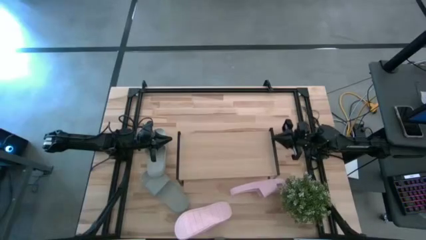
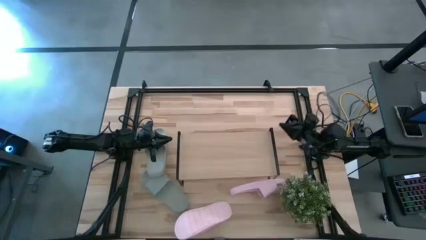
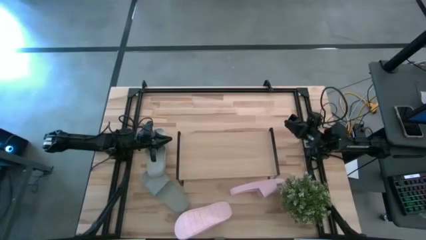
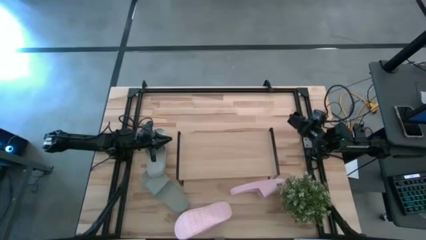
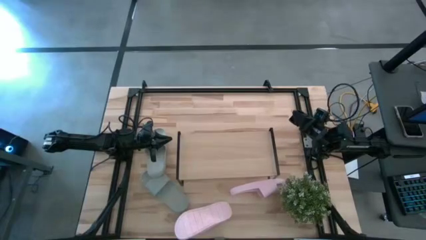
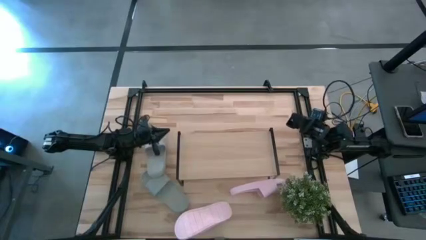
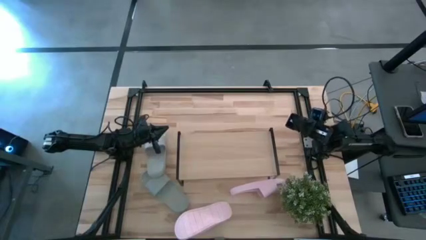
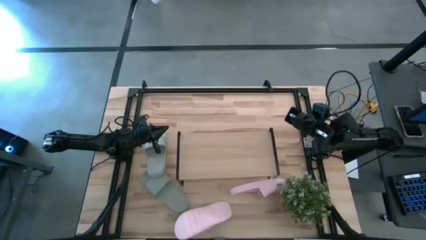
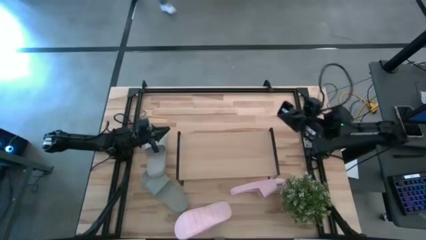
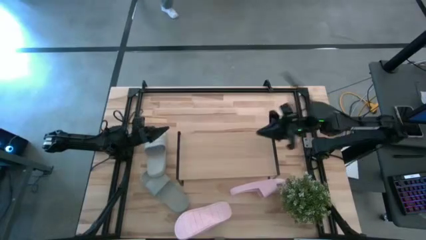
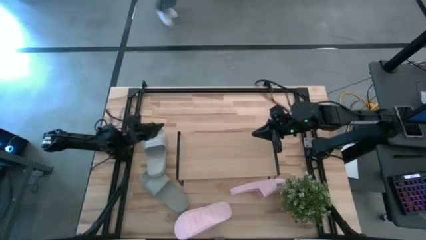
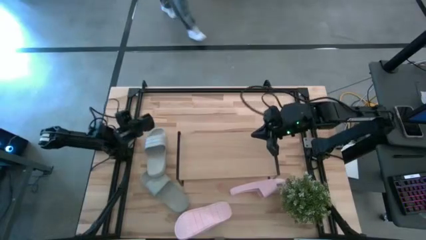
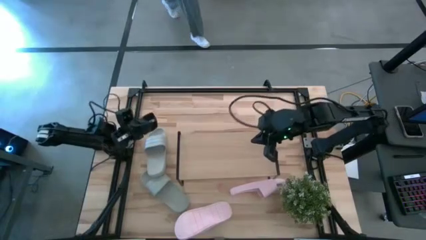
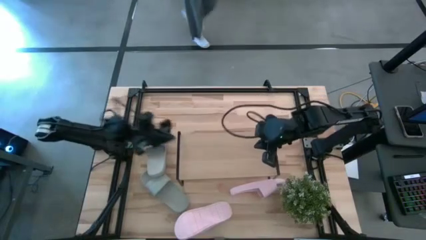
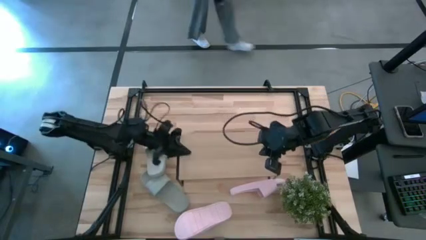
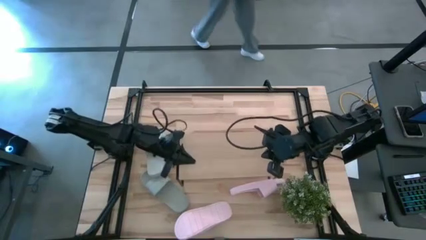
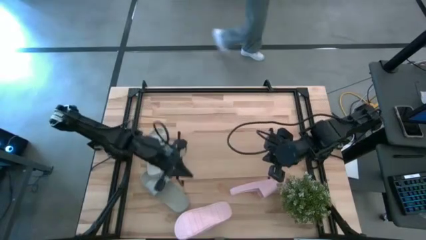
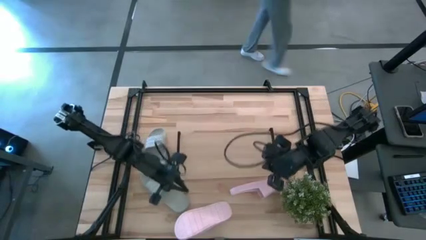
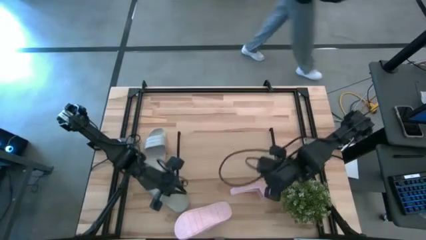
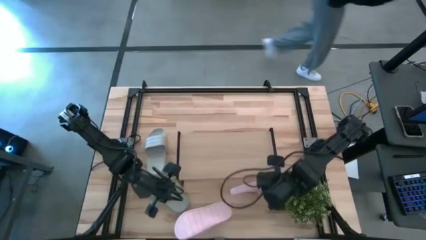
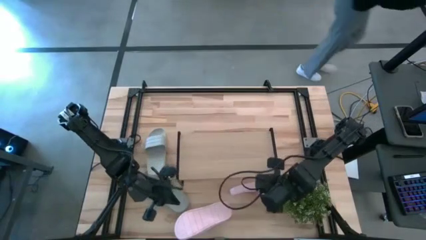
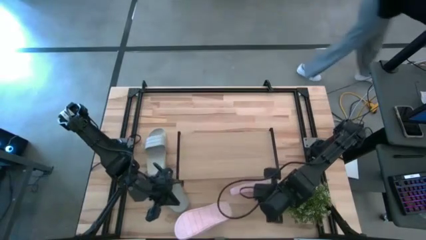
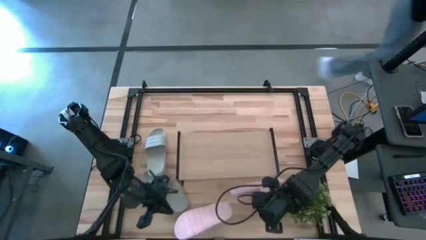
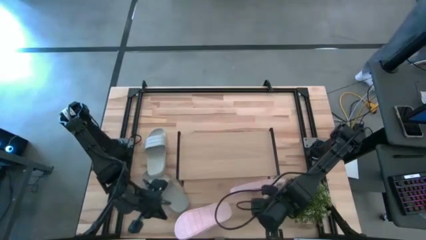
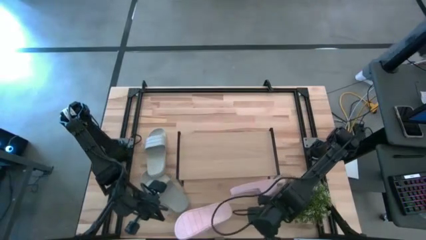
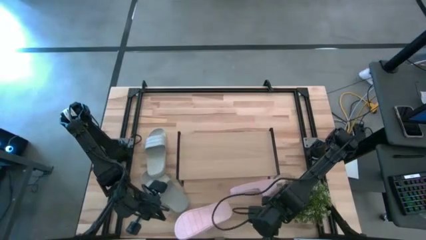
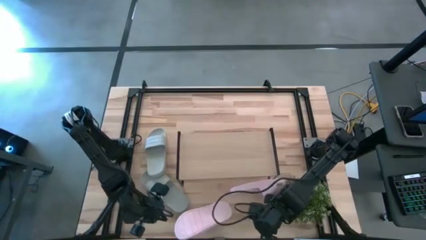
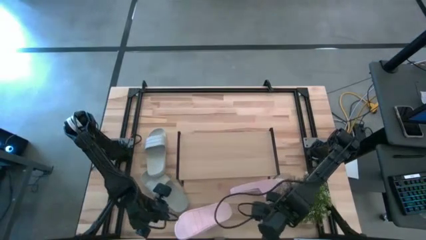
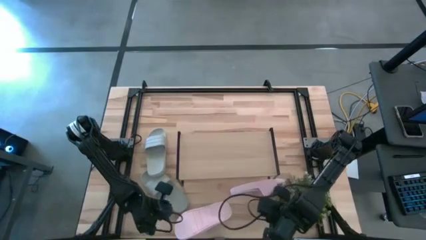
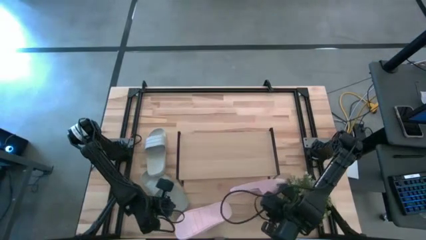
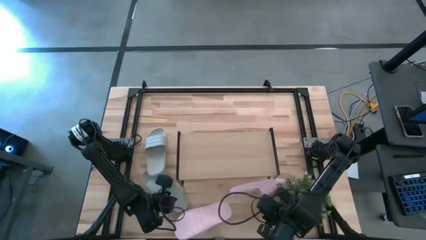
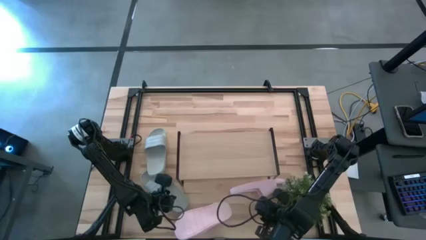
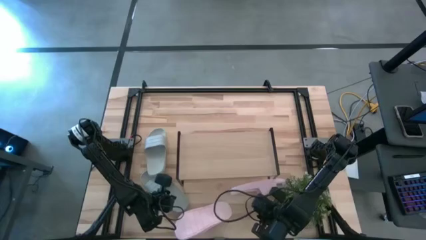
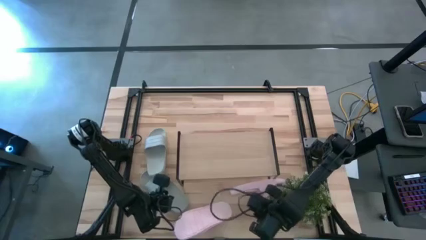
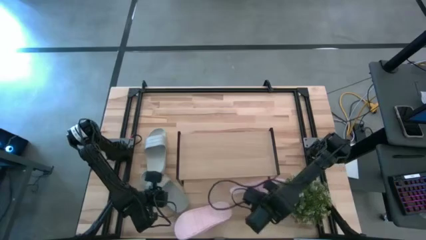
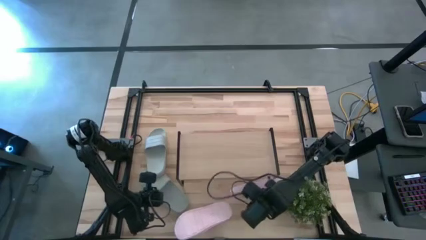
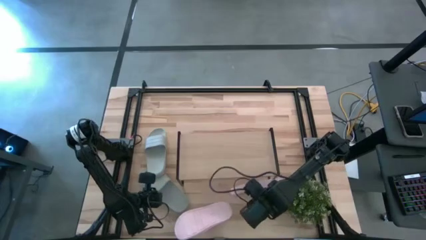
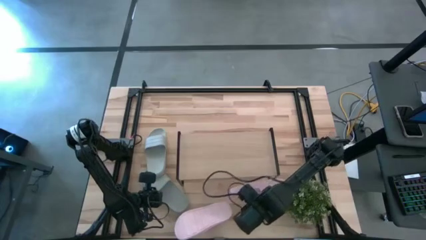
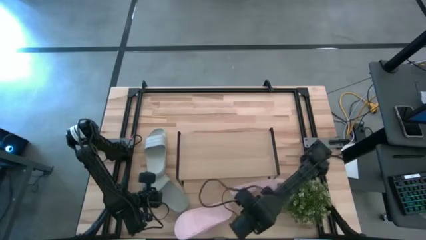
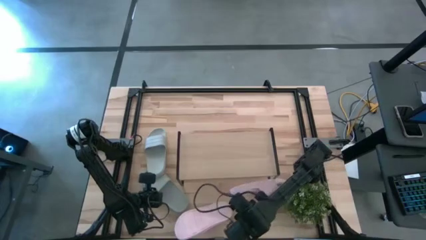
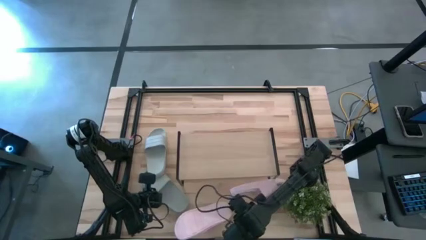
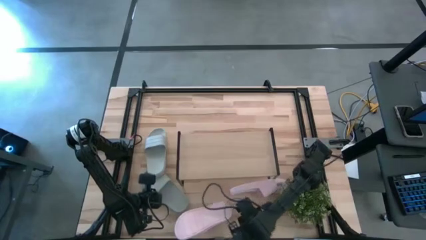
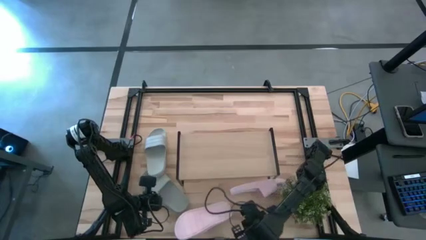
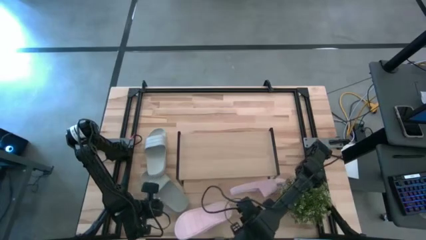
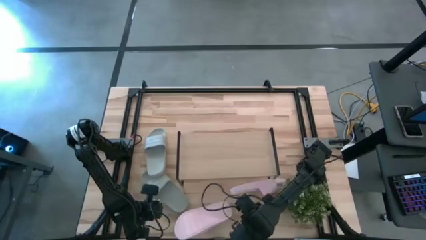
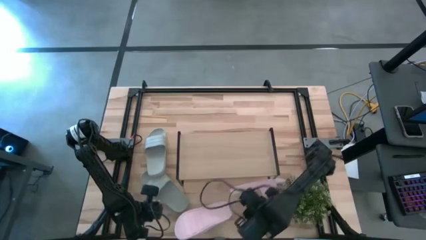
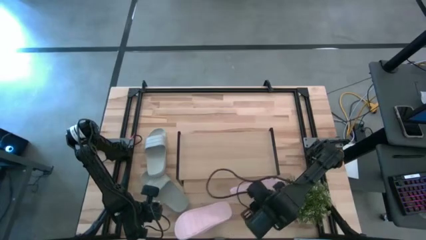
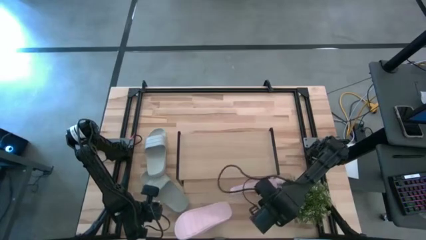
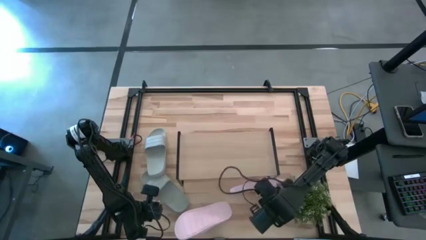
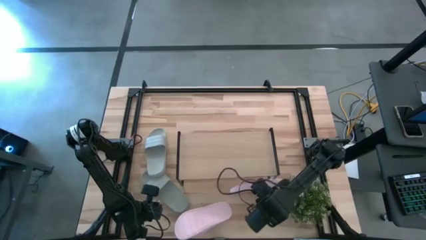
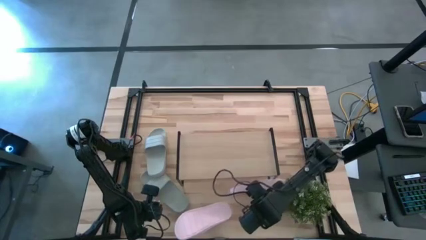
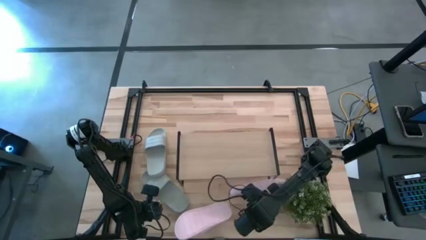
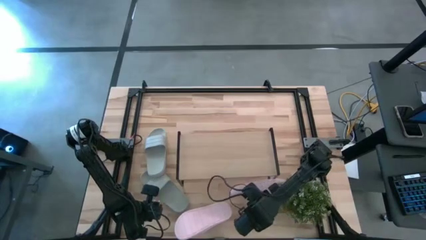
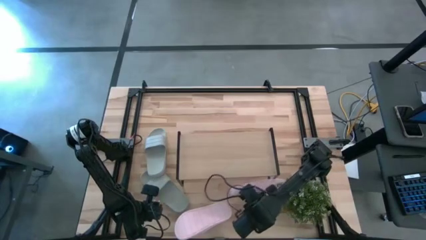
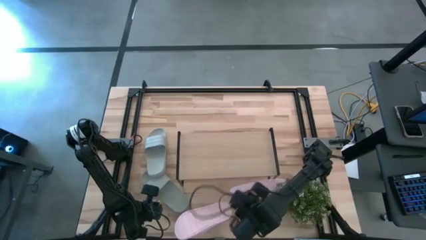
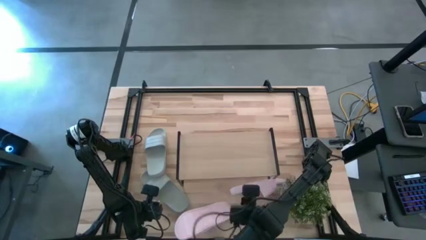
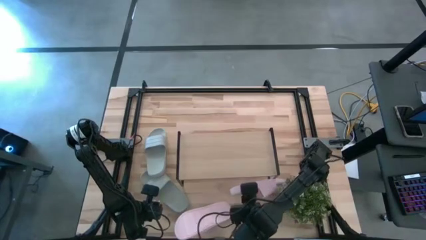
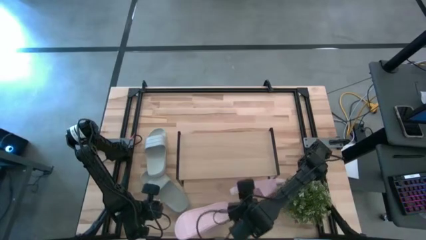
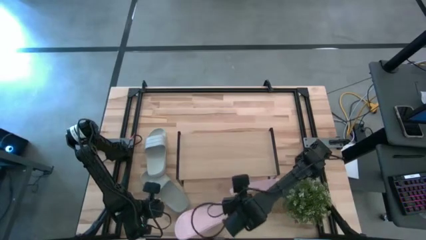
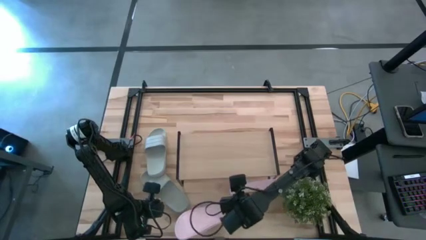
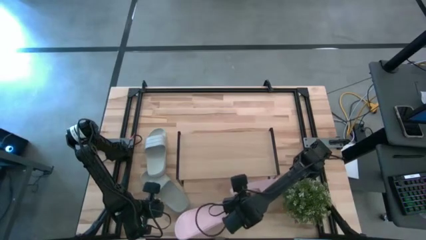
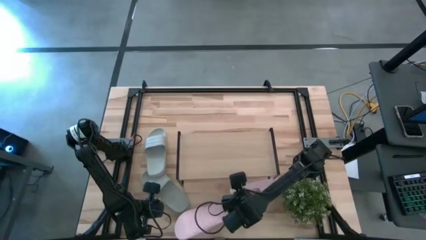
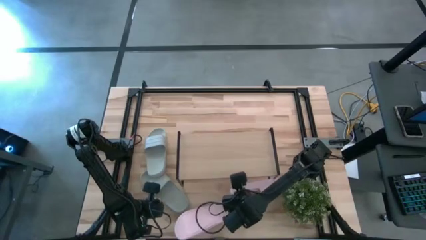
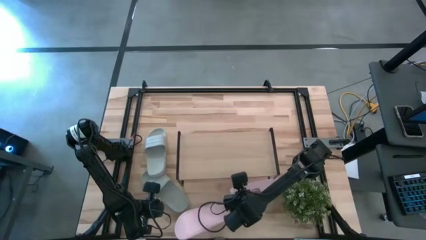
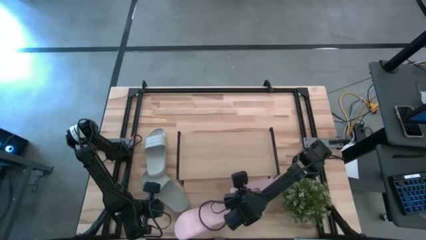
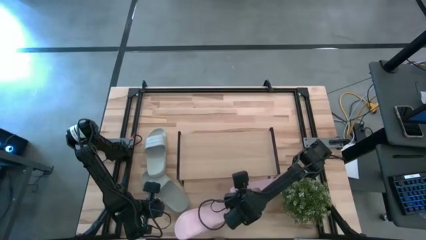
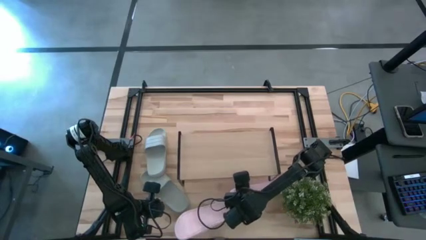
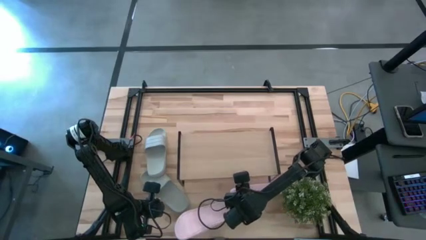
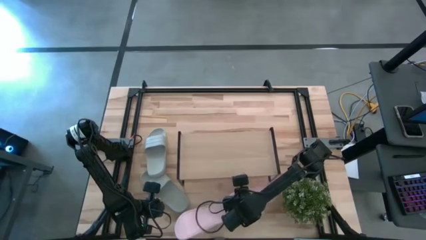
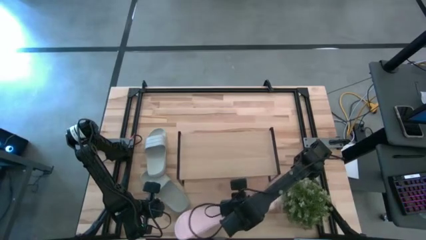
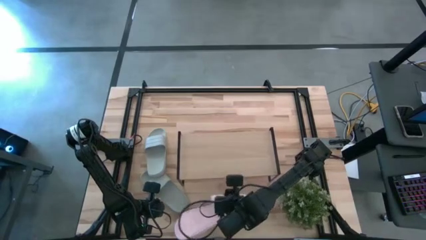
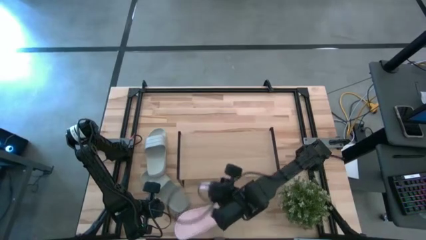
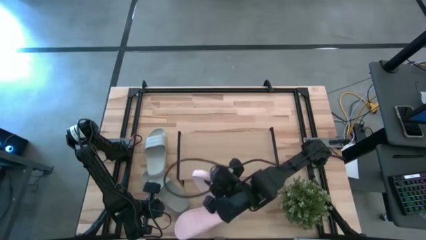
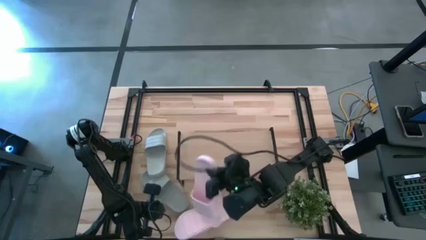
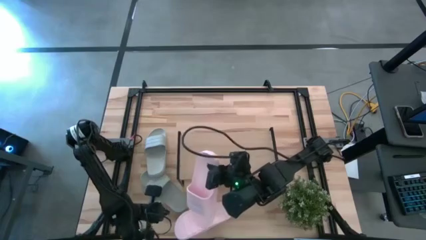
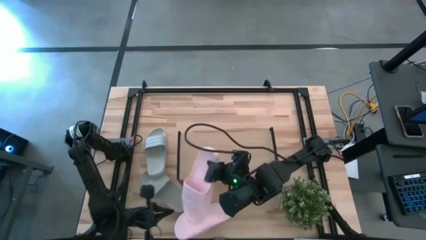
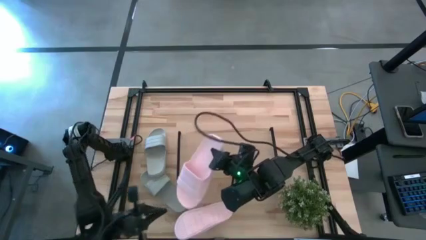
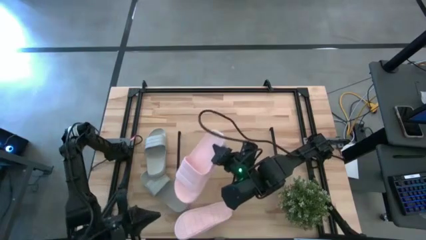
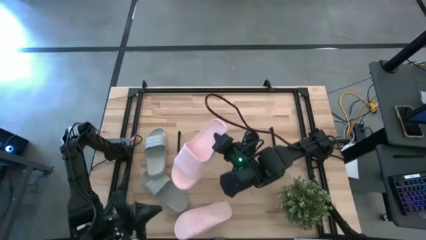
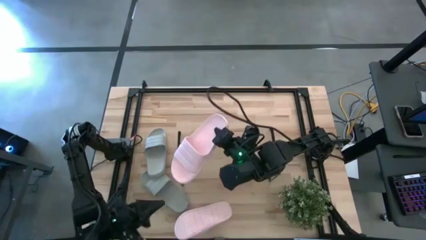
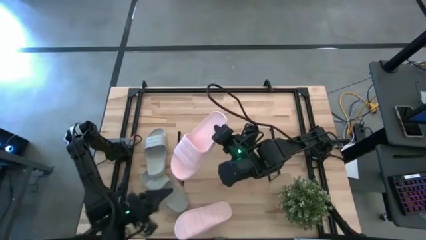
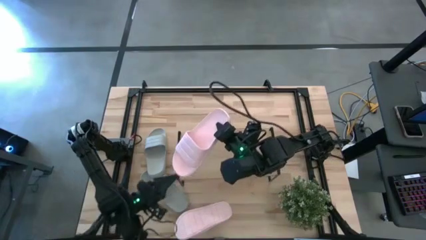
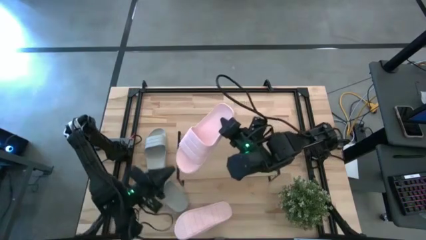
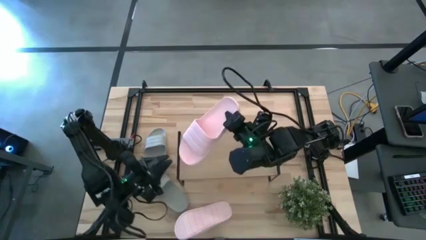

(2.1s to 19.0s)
Task: Pick and place slides into the shelf
Put the right pink slide on the shelf
